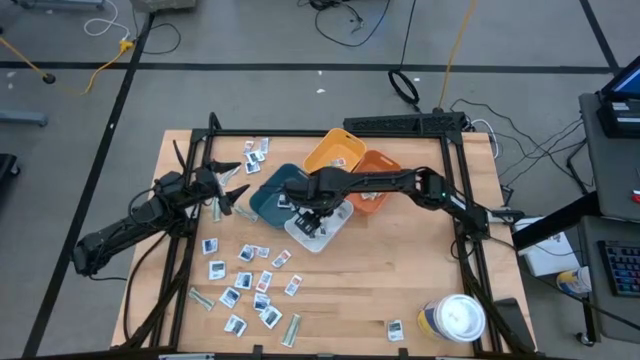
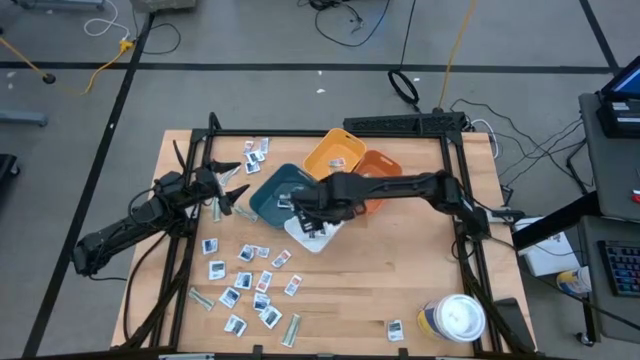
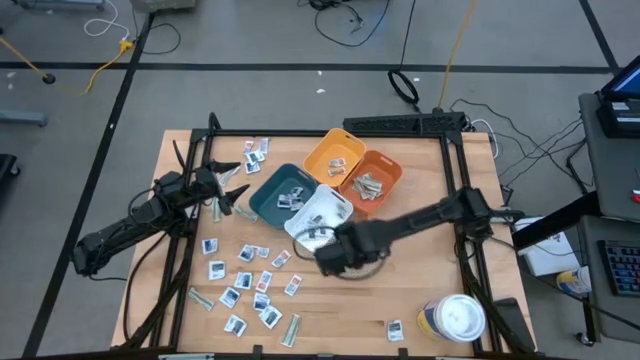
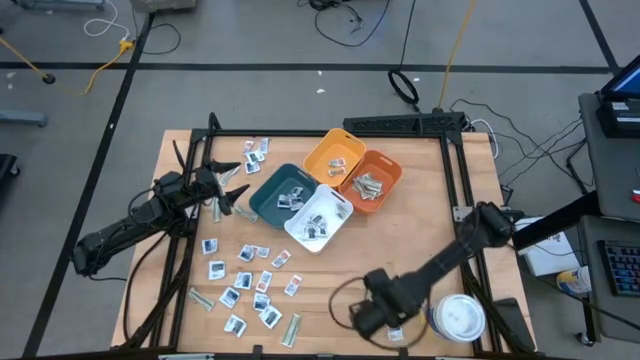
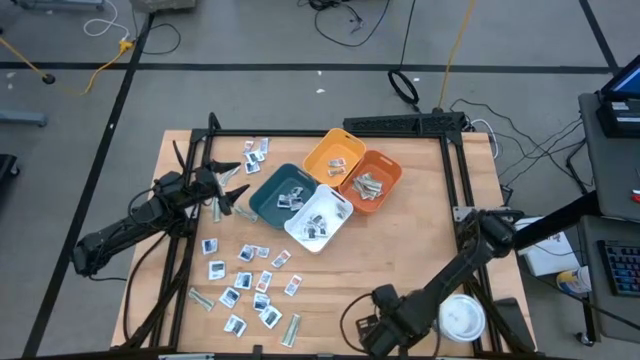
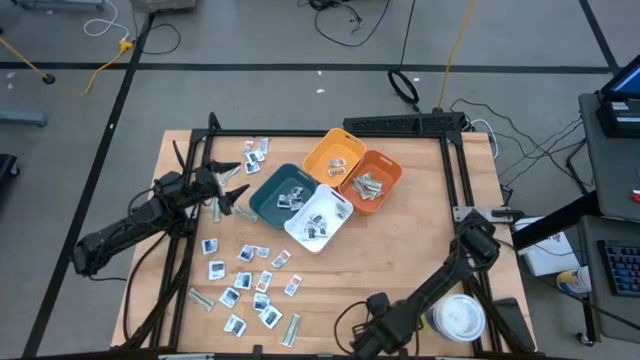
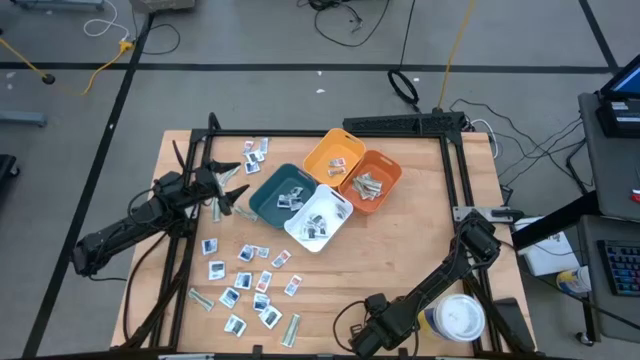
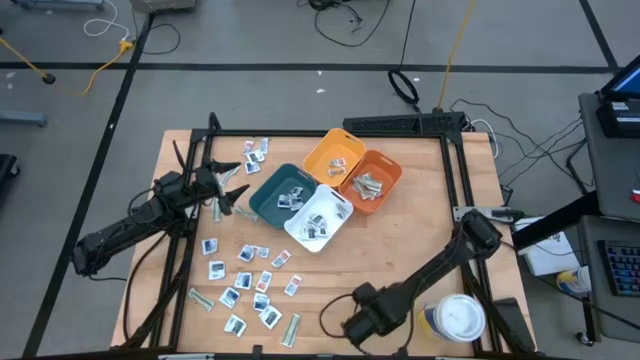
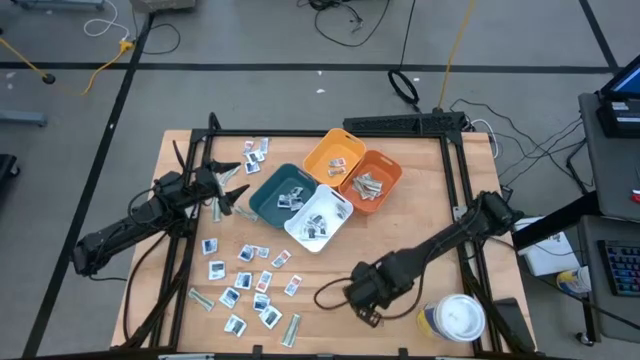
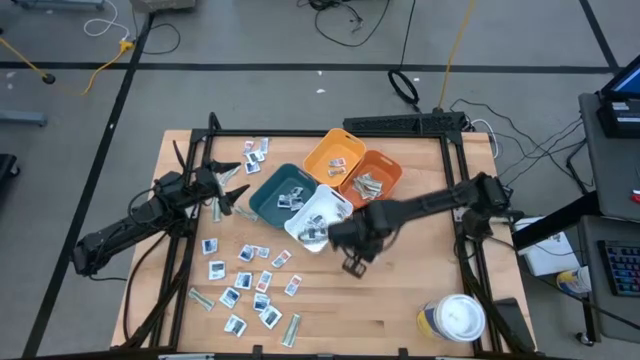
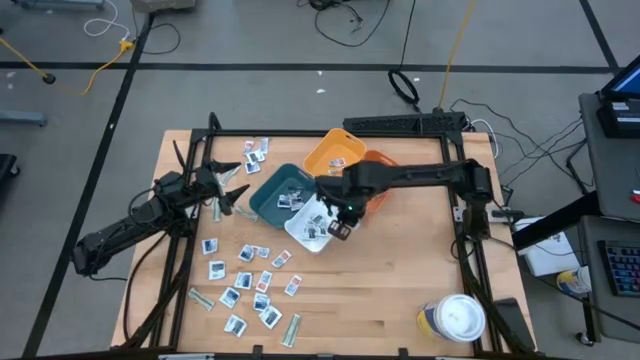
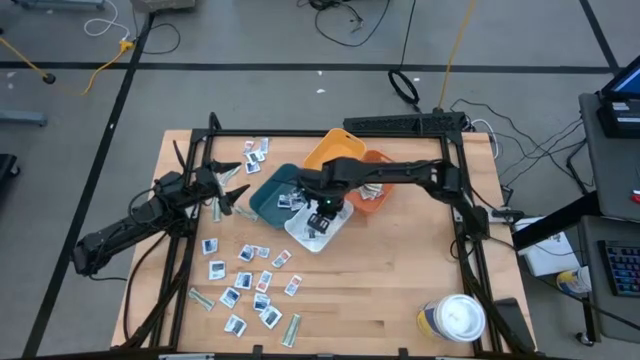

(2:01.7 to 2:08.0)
Task: Pick & Place First Aid Supplies
Put the black towelette pack into the white bin

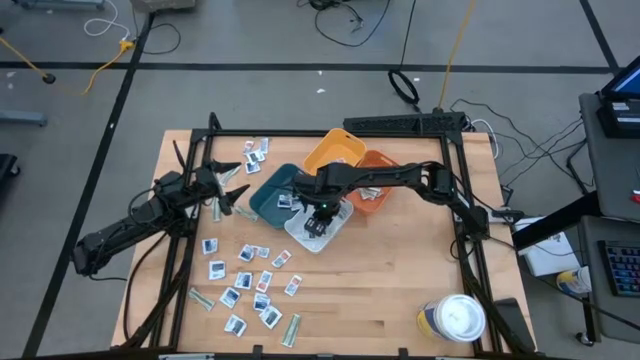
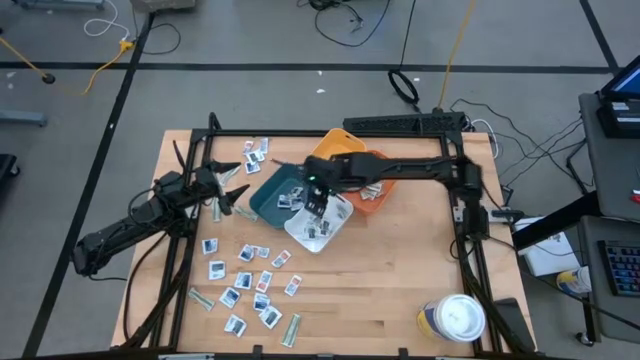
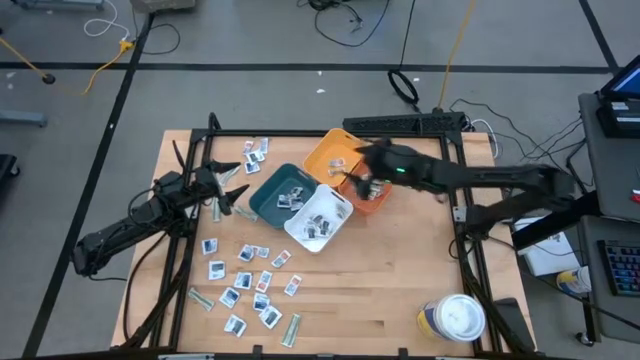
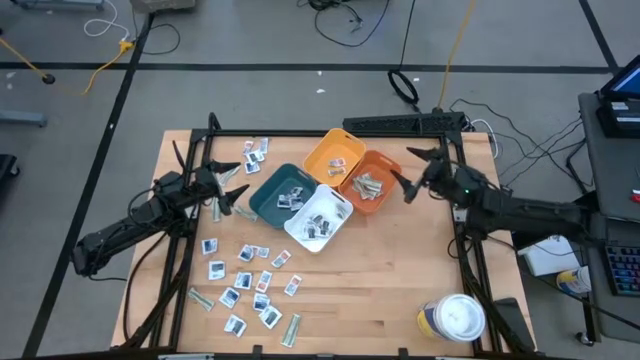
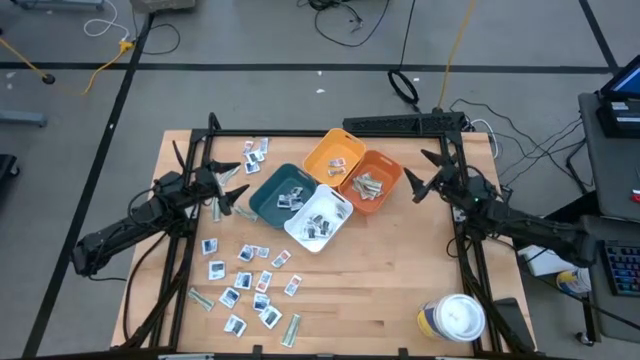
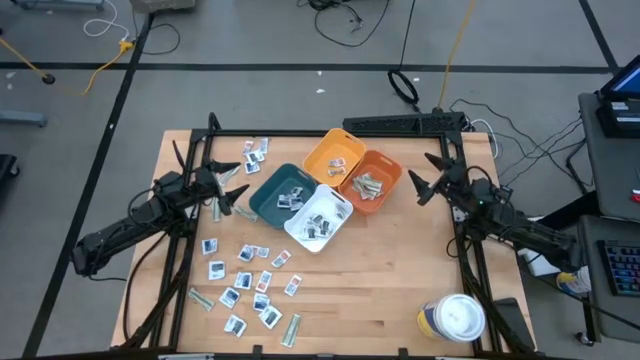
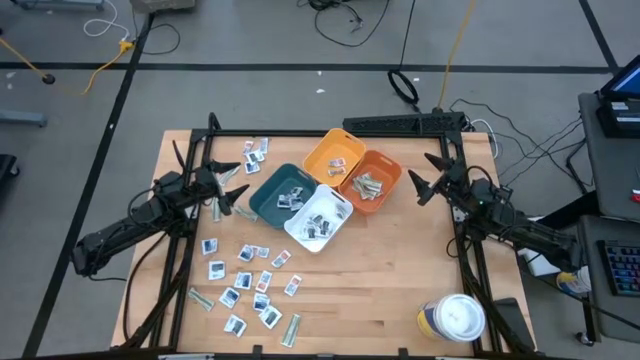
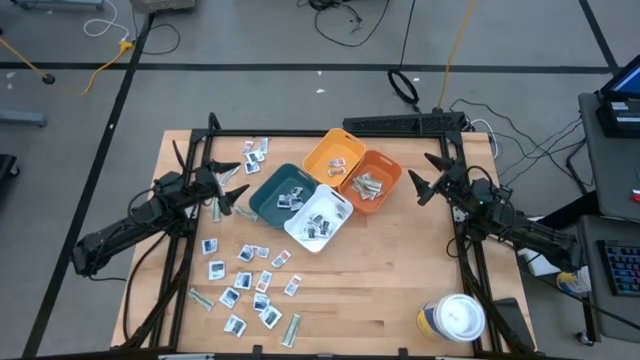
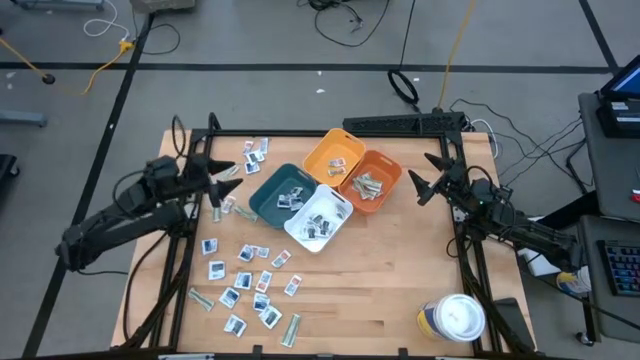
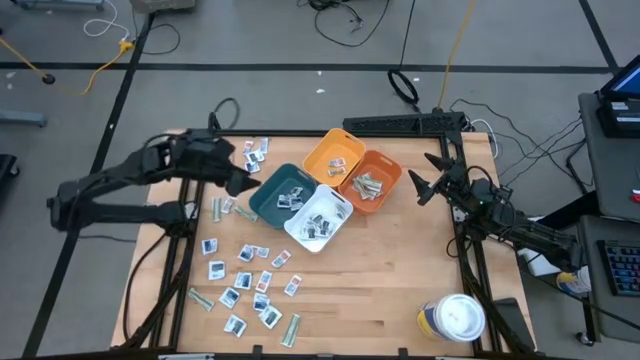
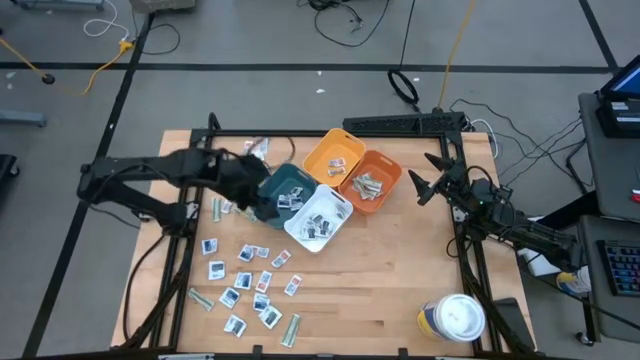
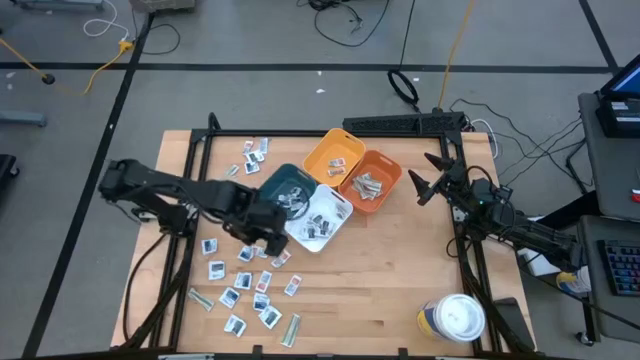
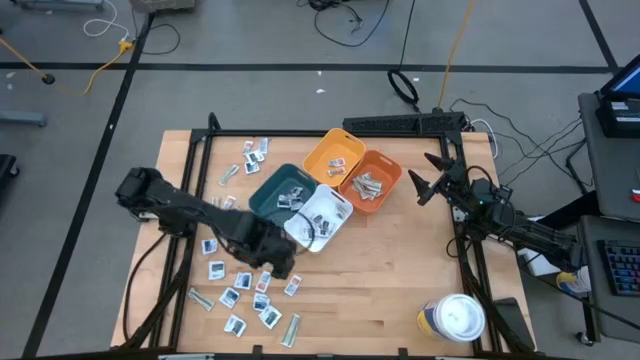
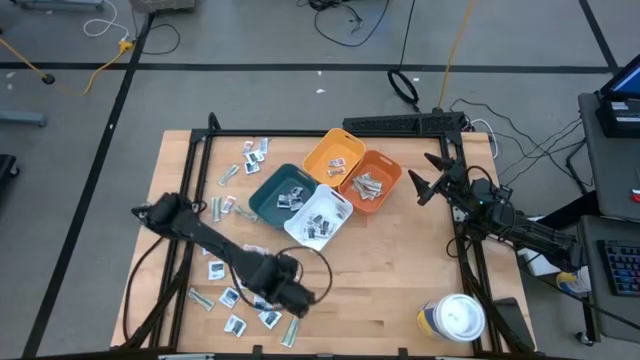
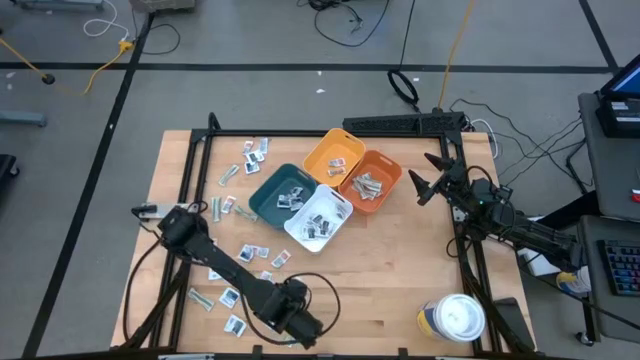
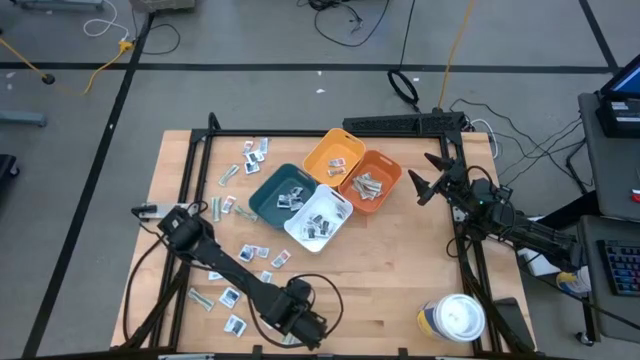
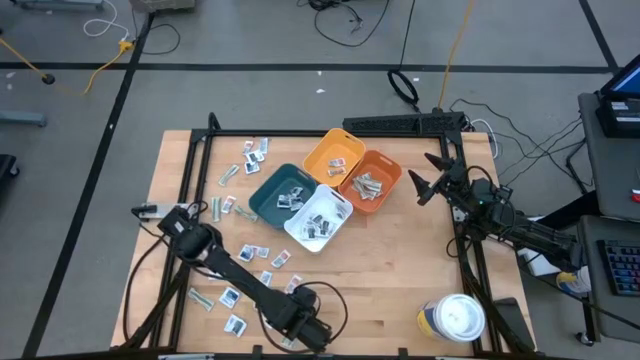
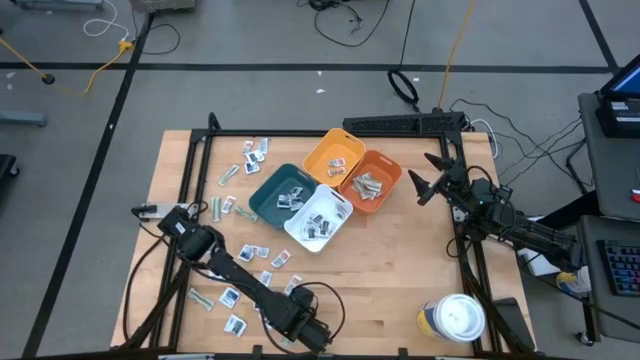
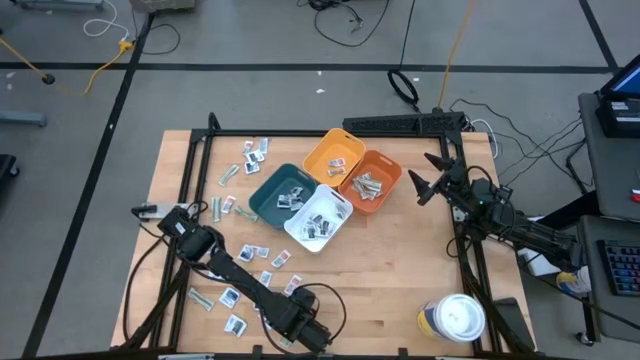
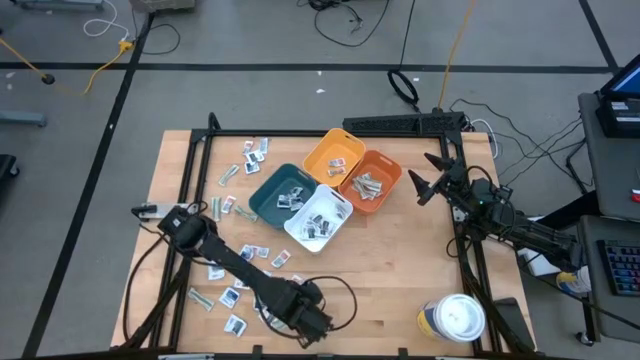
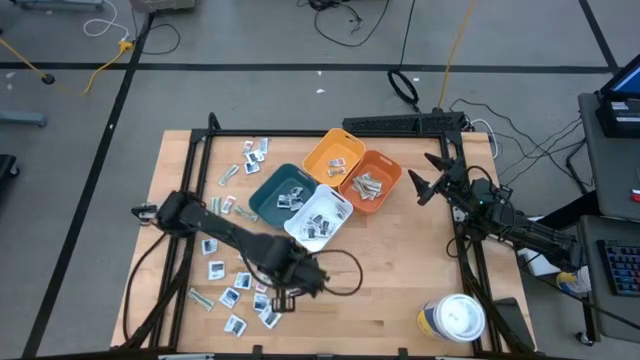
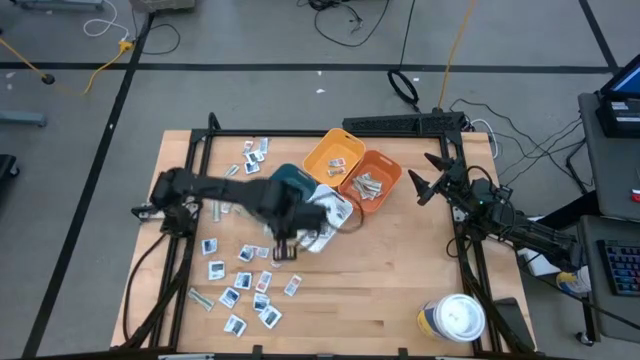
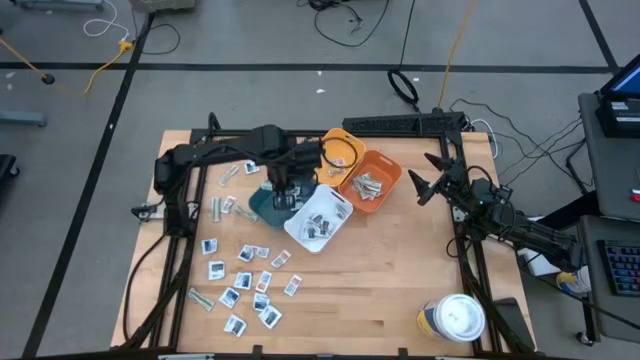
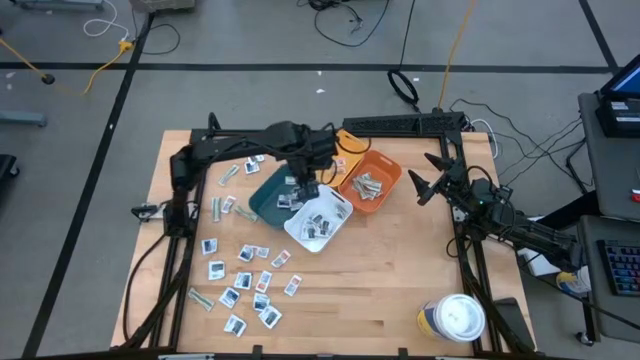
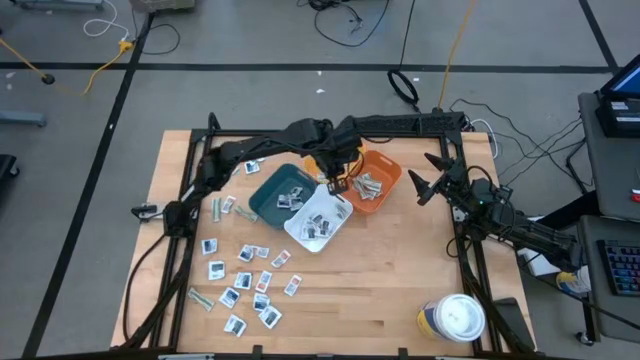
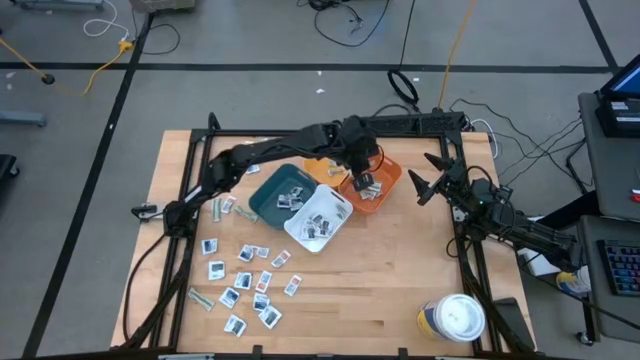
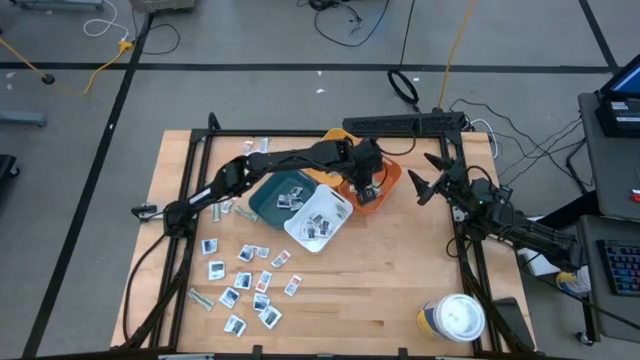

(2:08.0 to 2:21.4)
Put the green bandage pack into the orange bin

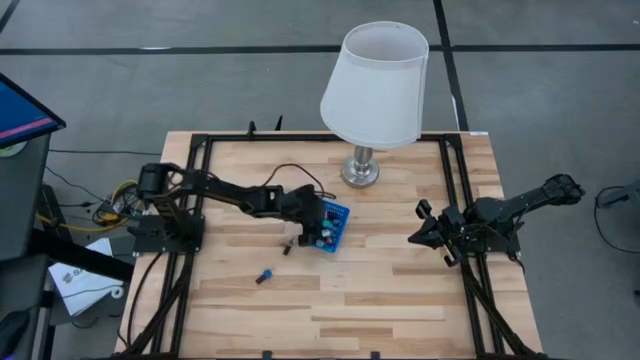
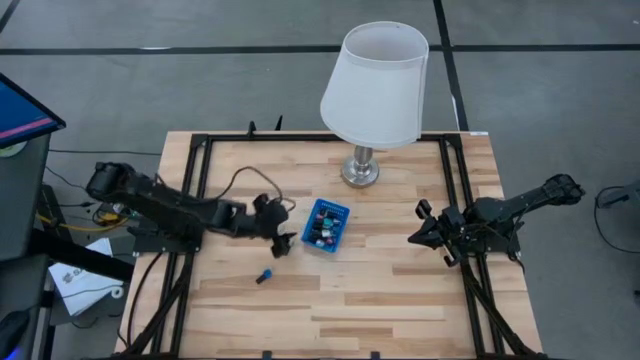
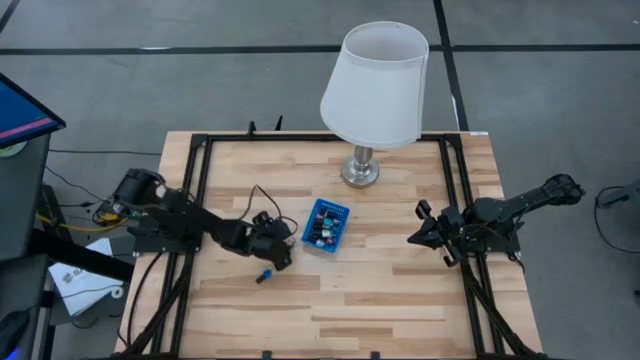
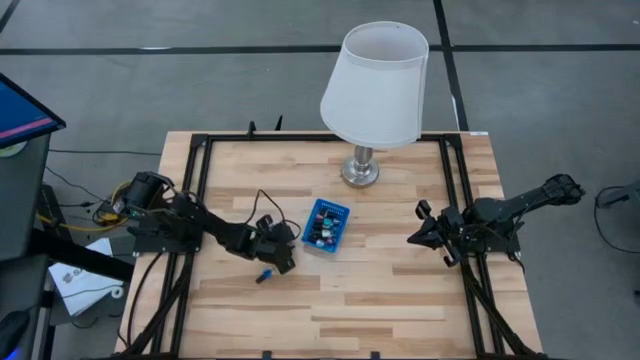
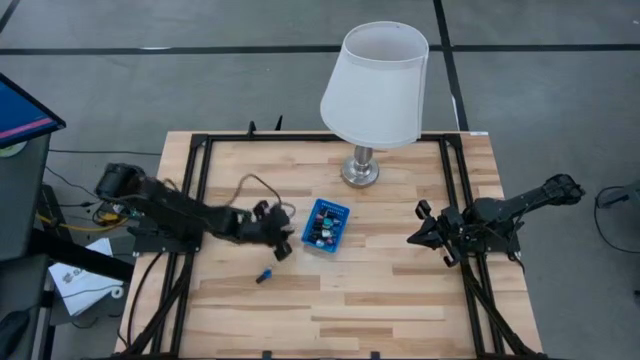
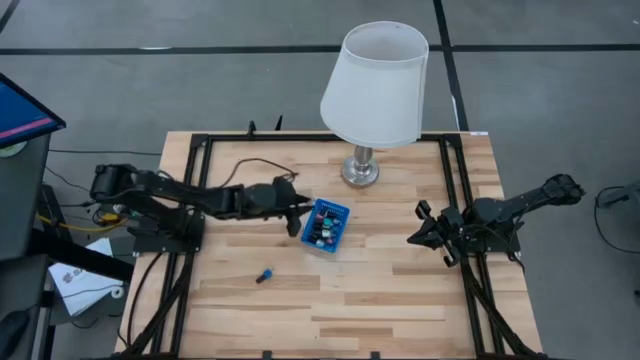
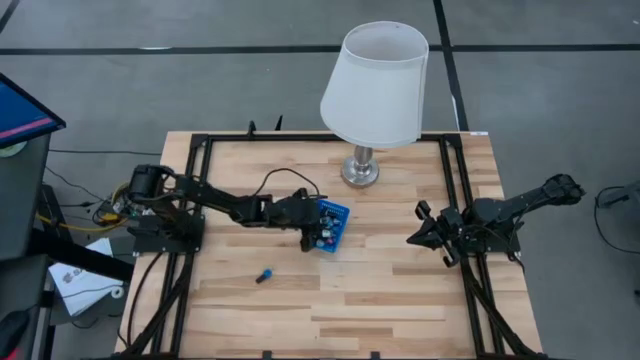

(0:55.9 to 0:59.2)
Task: Pick & Place Nail Polish
Put the clear nail polish into the blue basket
